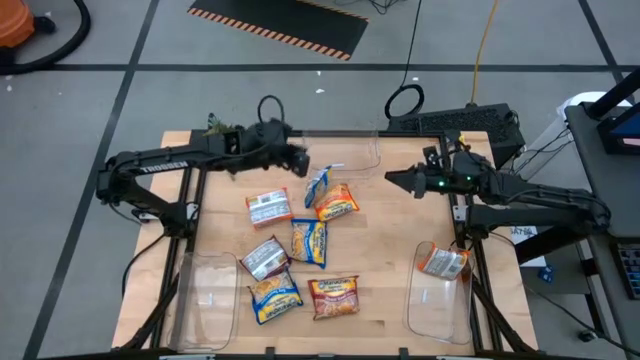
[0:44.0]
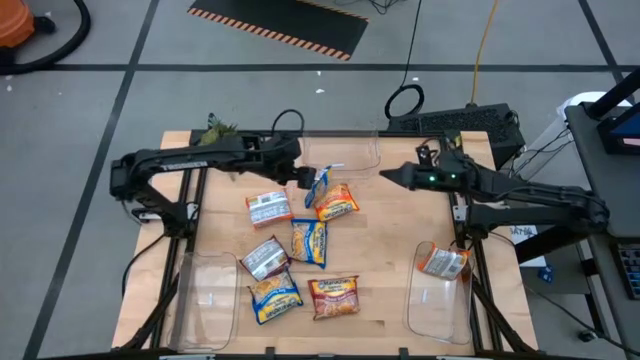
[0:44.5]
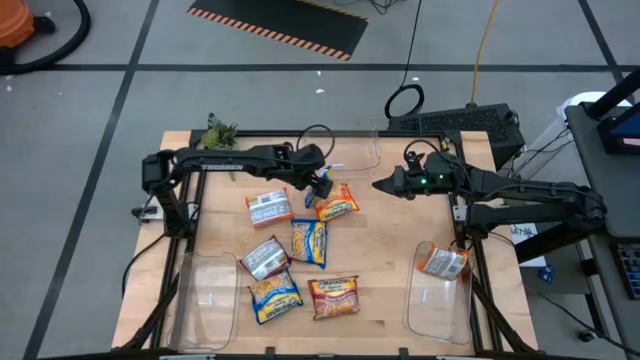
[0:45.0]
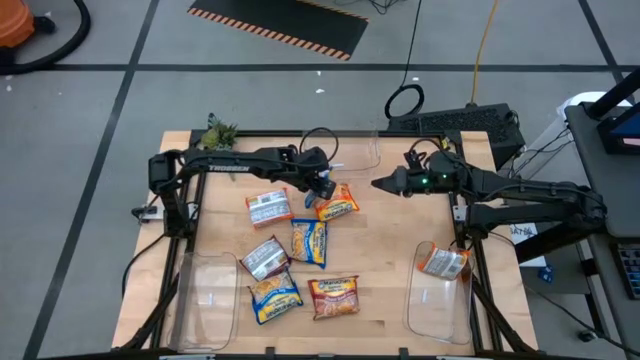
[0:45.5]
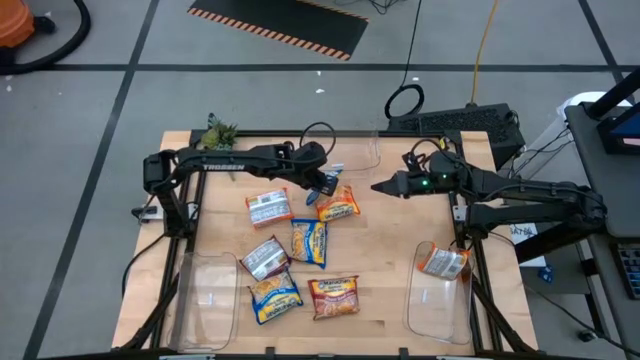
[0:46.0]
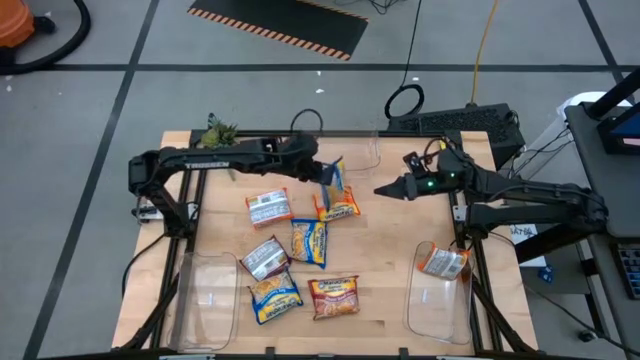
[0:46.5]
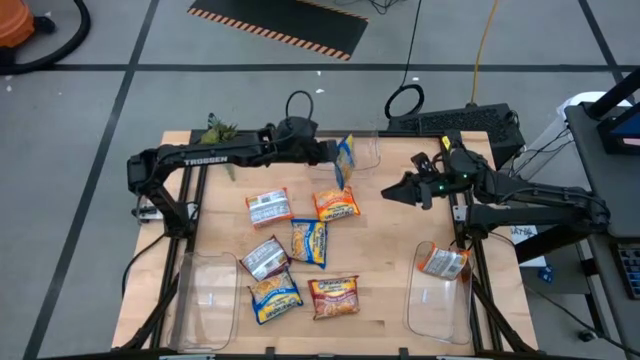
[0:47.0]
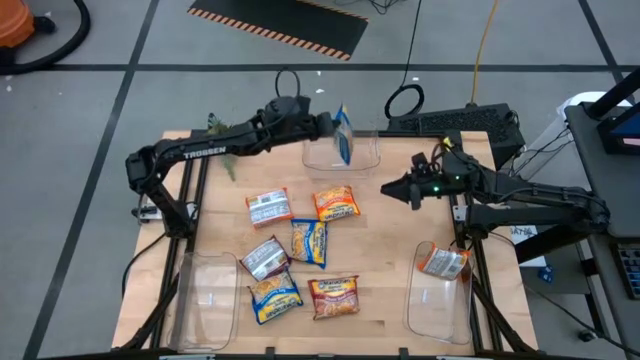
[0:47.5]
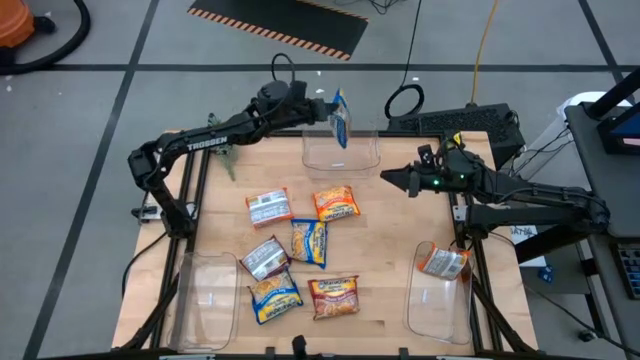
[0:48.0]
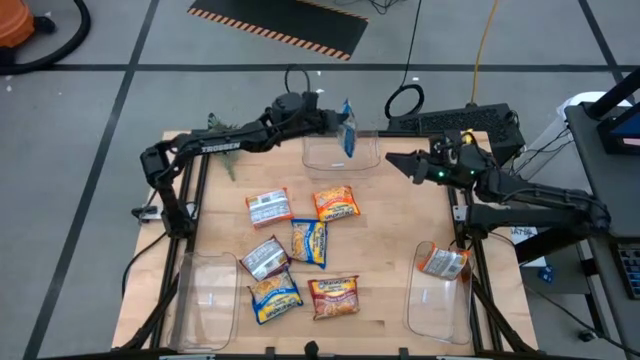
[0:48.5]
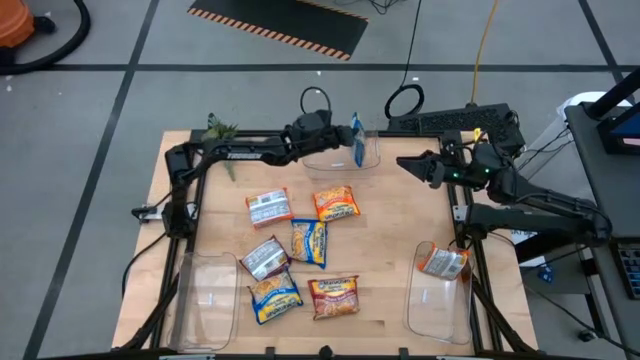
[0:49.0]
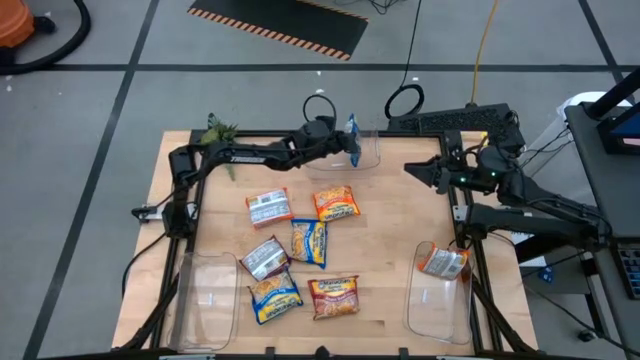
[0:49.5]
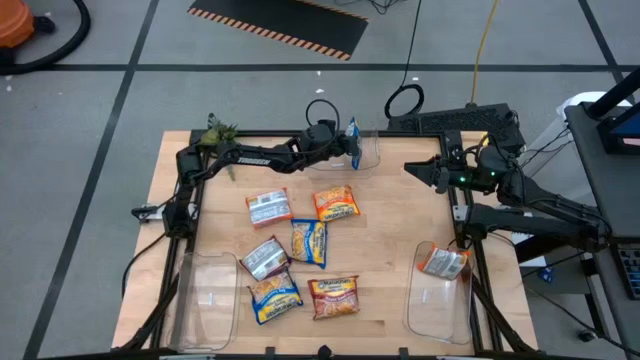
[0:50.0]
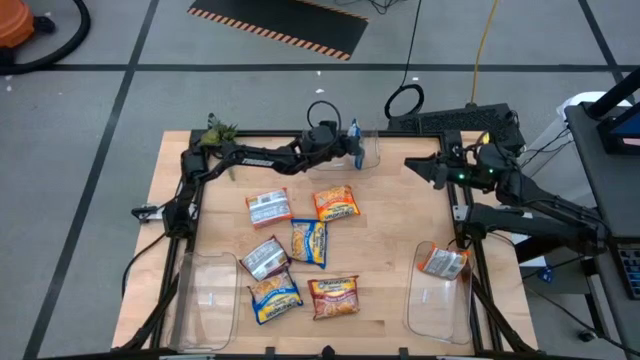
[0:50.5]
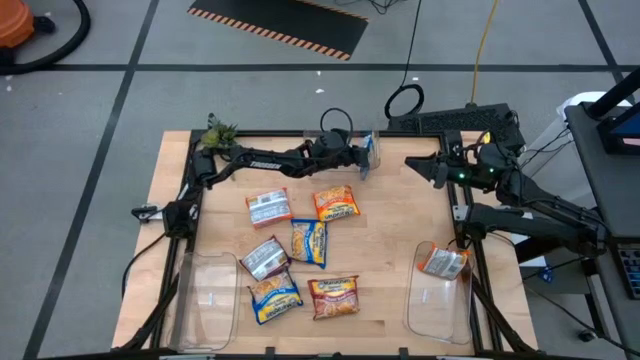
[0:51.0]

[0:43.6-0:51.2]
Task: Sort Maruchan noodles
Put the bottom right blue noodle pack into the top transparent bin

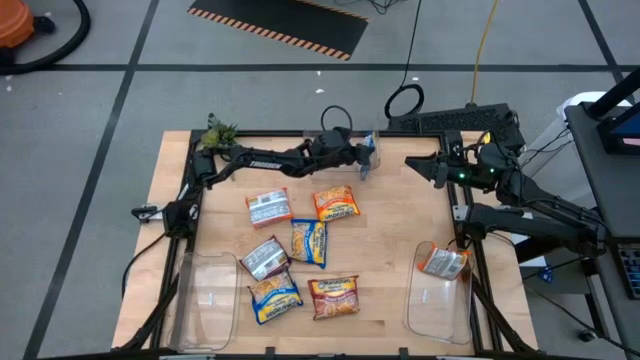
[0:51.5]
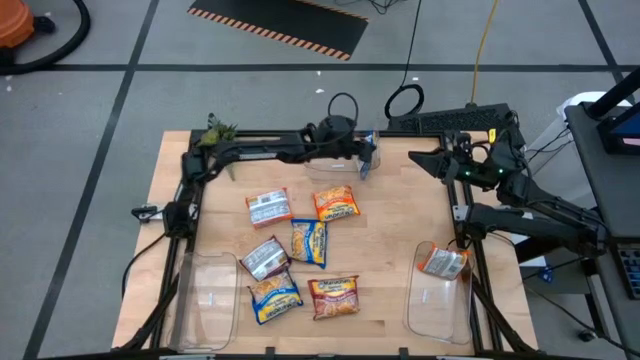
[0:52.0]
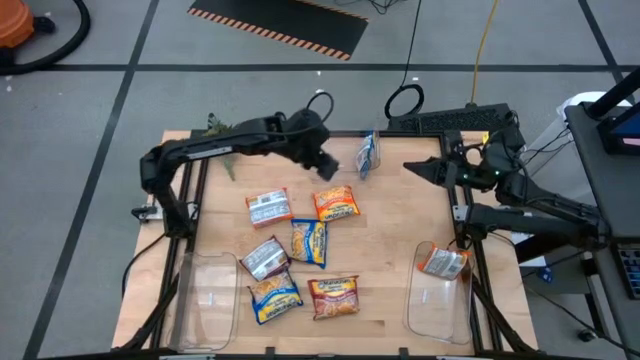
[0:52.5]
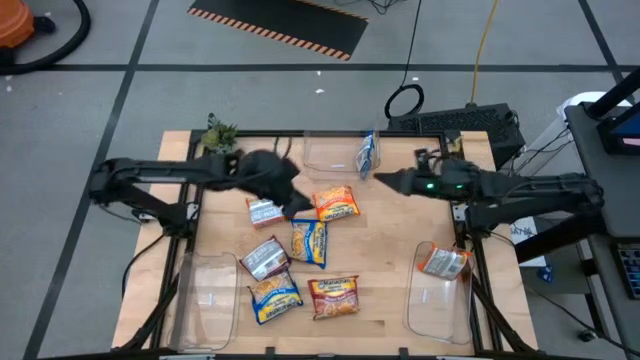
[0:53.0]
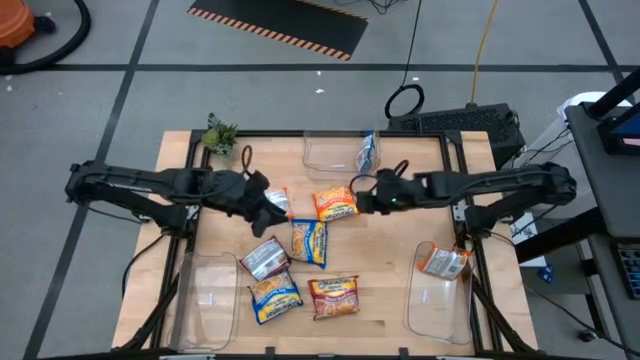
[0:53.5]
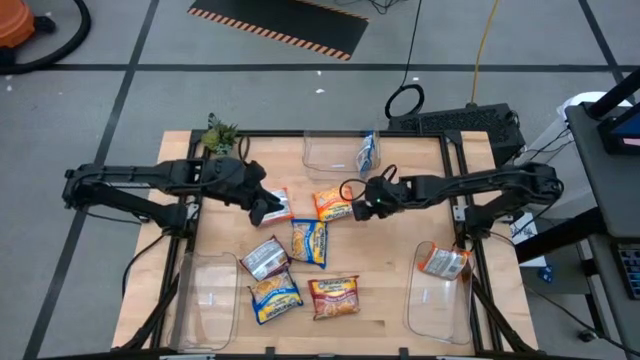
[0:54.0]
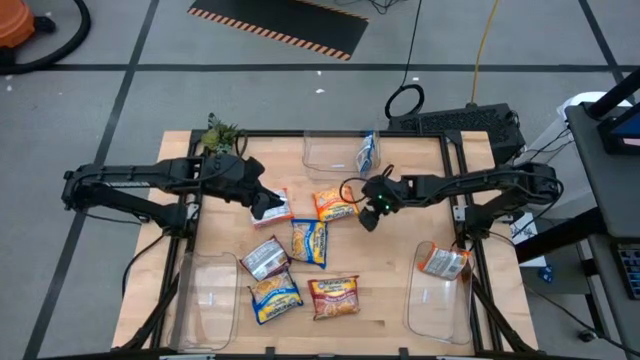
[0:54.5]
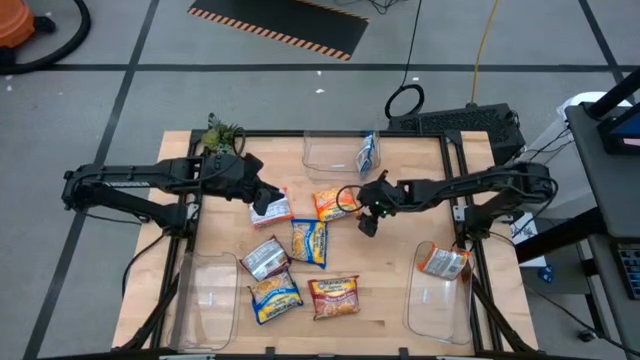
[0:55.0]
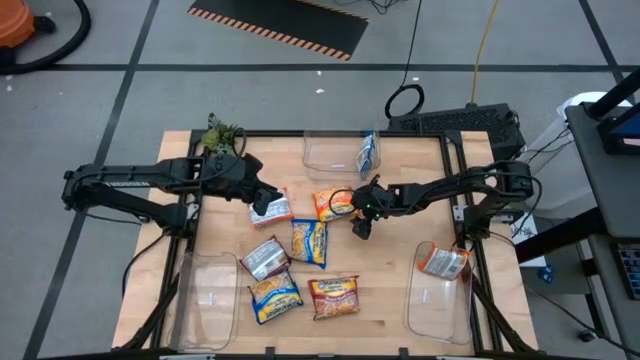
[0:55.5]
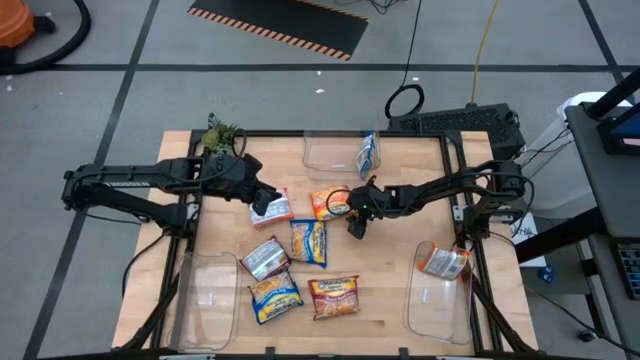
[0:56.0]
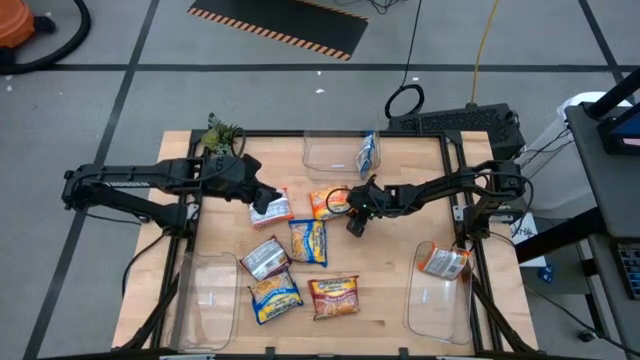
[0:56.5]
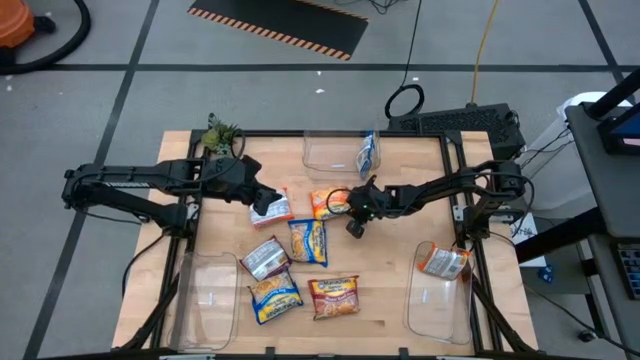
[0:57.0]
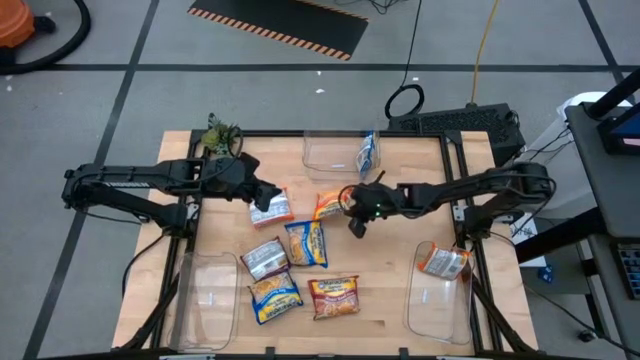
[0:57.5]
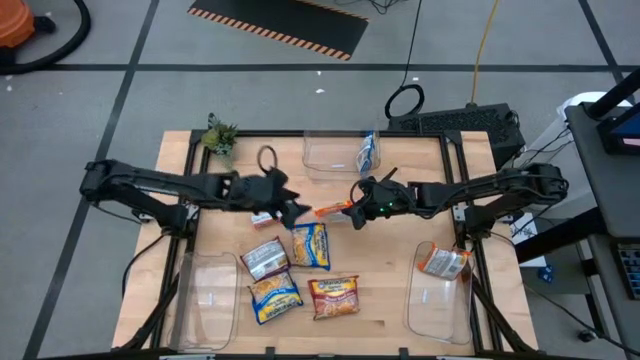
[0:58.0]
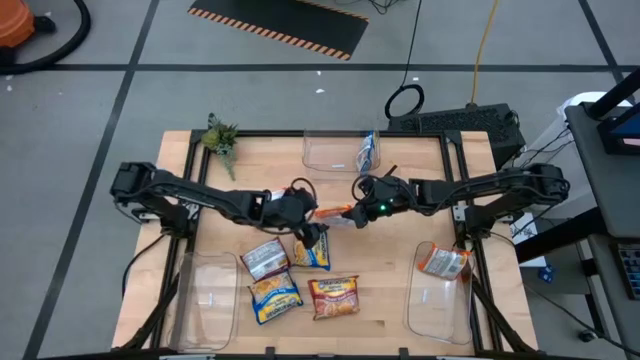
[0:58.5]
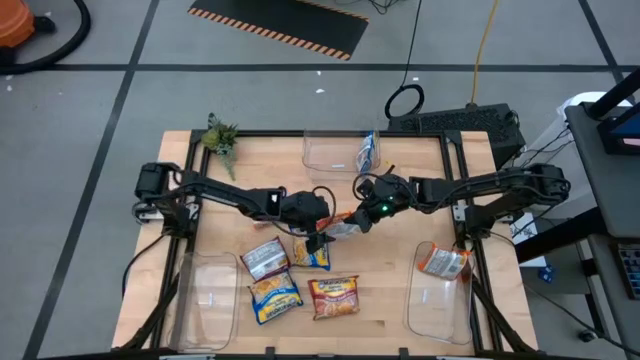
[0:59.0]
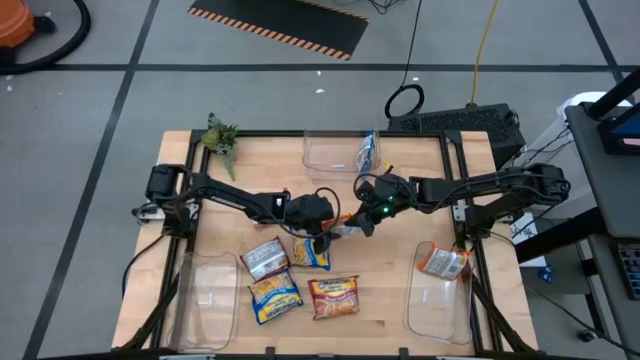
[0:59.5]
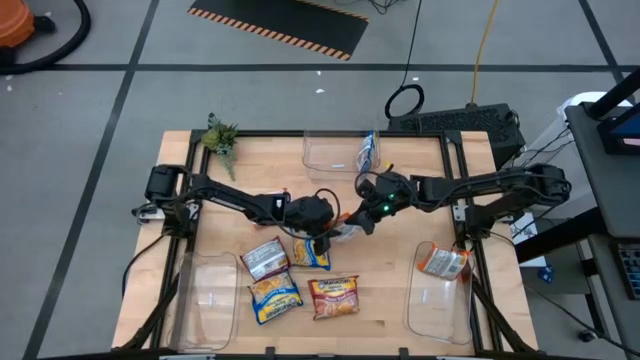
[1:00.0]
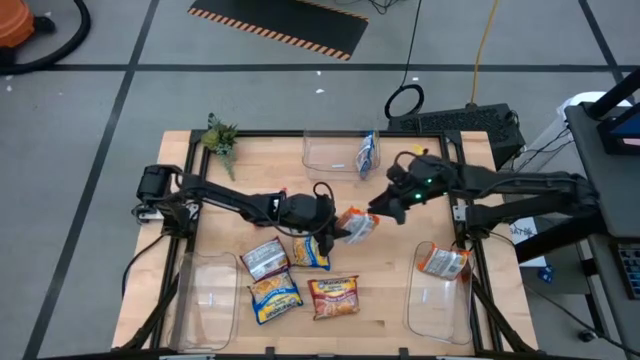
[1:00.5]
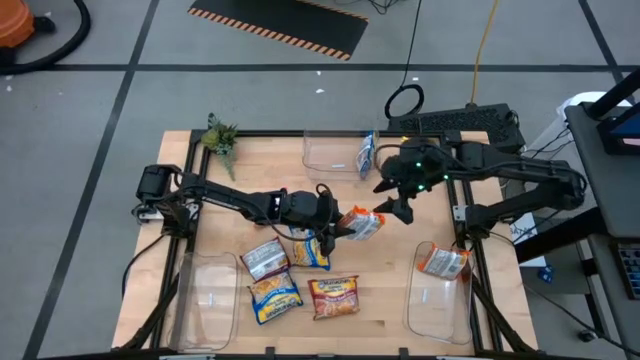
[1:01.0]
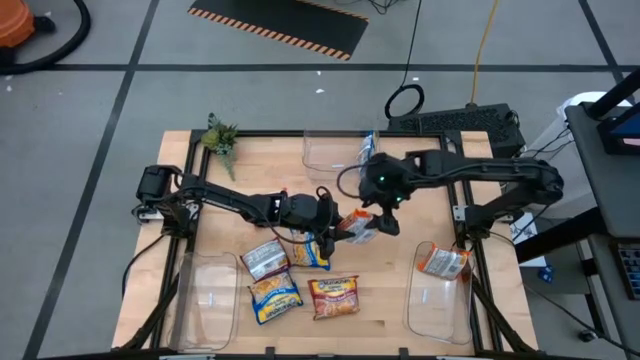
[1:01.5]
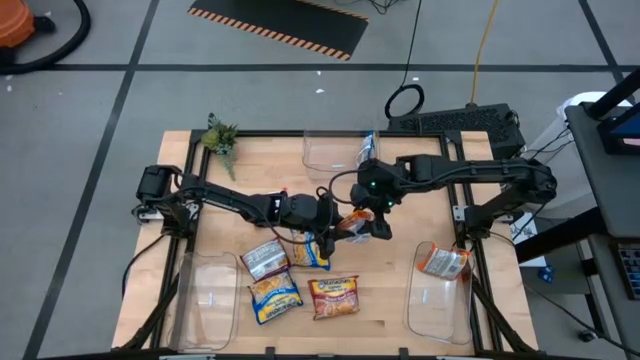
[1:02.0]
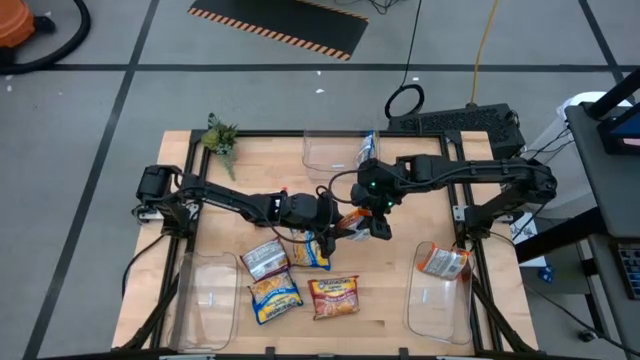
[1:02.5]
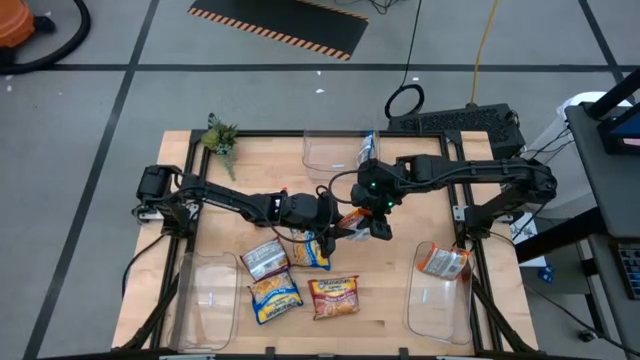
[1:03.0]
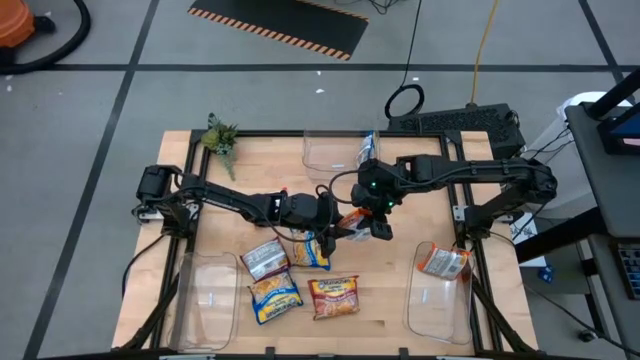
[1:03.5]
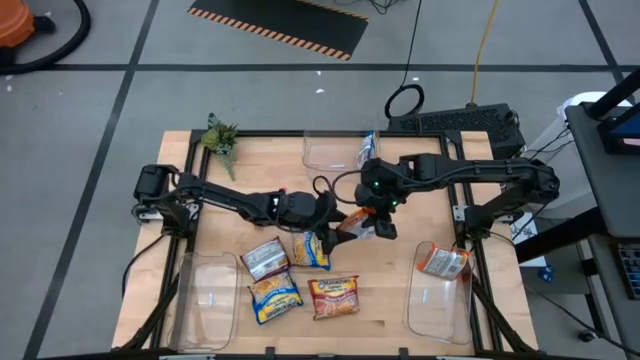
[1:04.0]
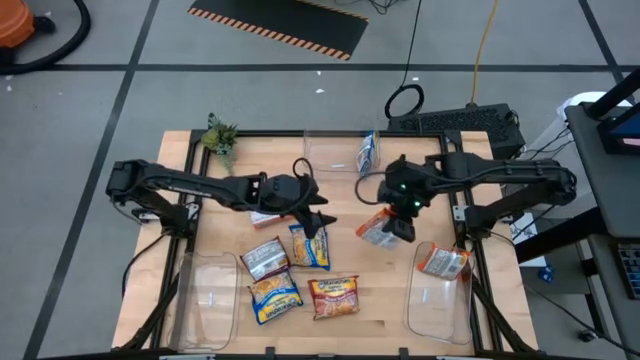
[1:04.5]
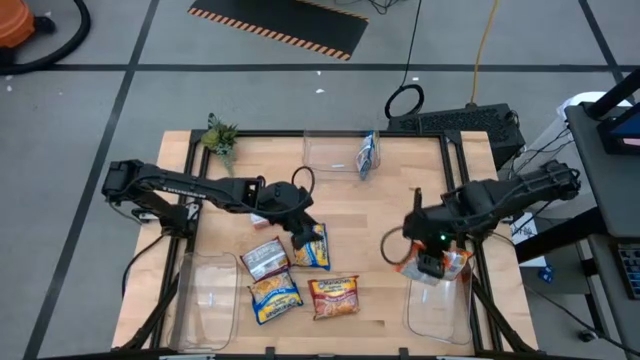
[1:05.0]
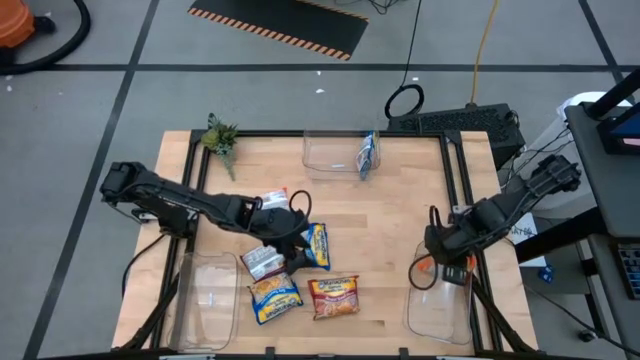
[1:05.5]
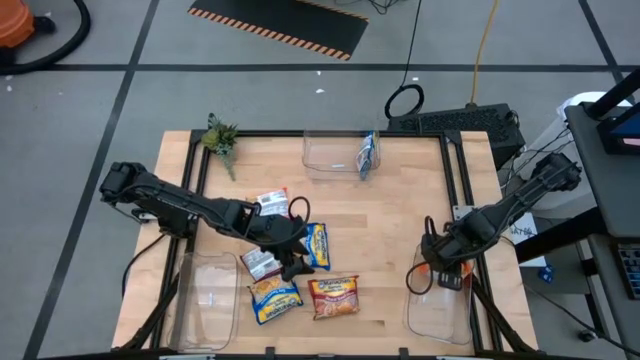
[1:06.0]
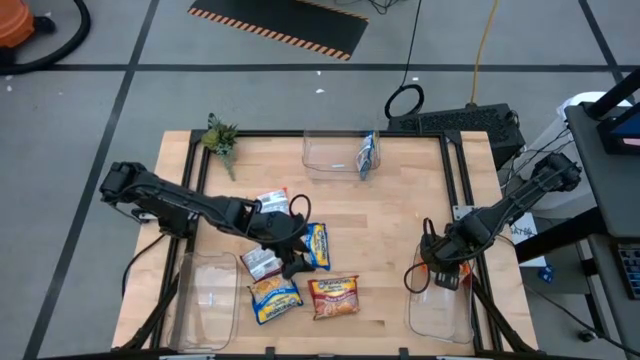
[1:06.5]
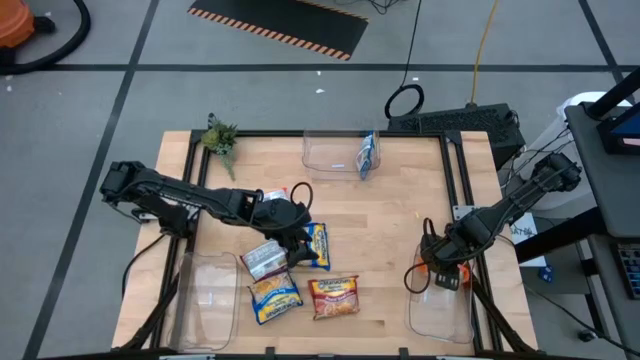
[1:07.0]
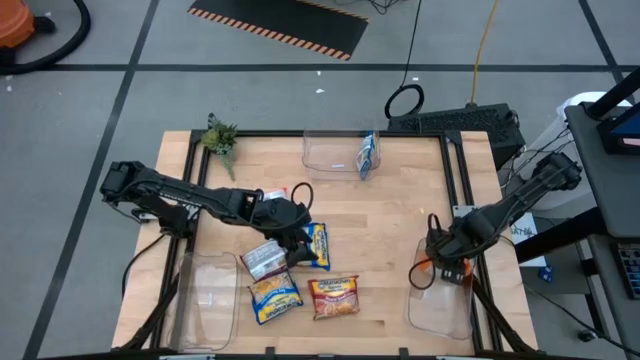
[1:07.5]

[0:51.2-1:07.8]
Put the right orange noodle pack into the bottom right transparent bin
